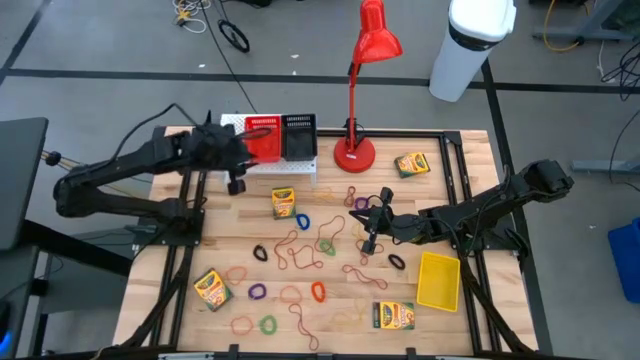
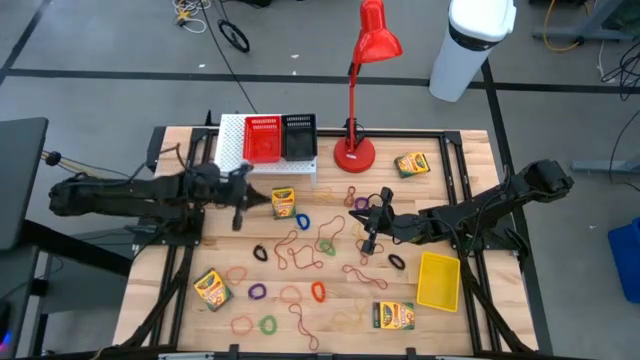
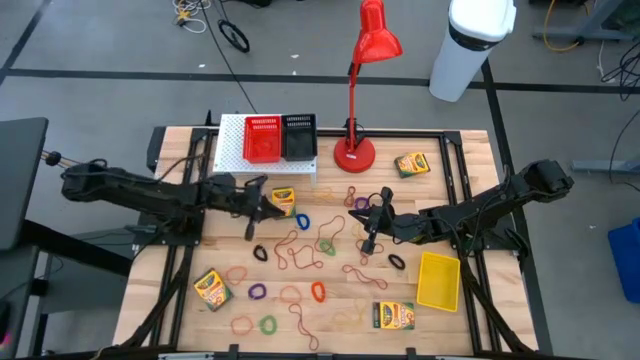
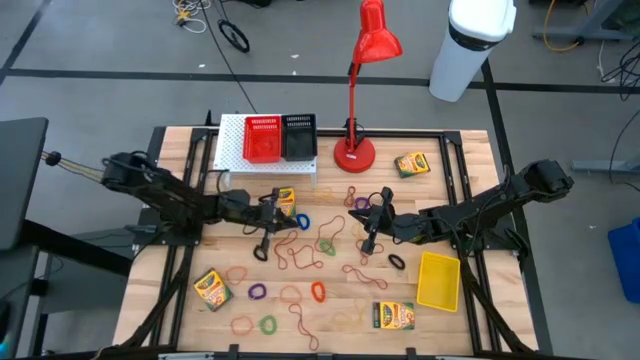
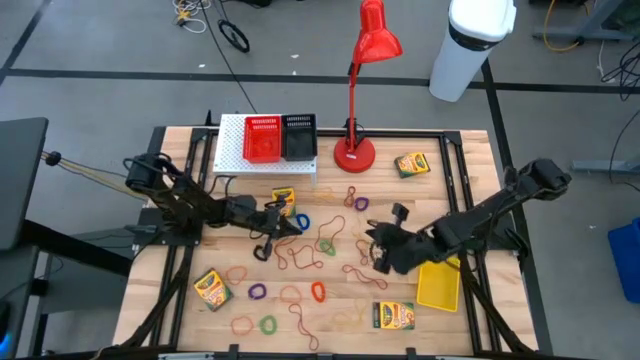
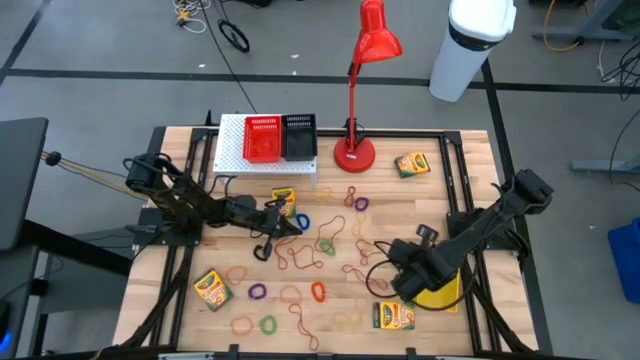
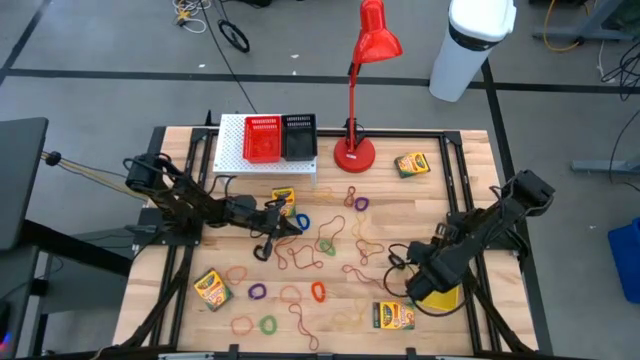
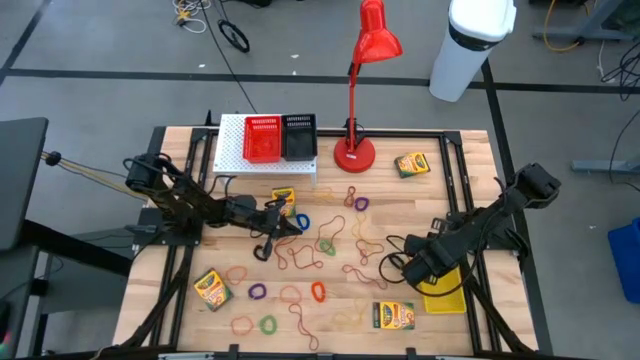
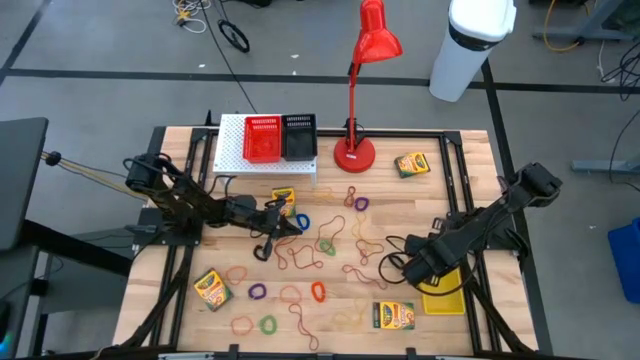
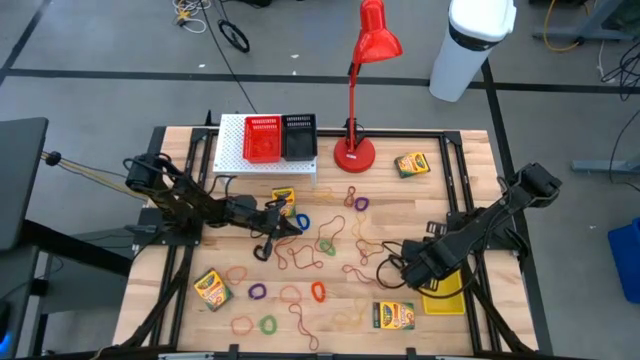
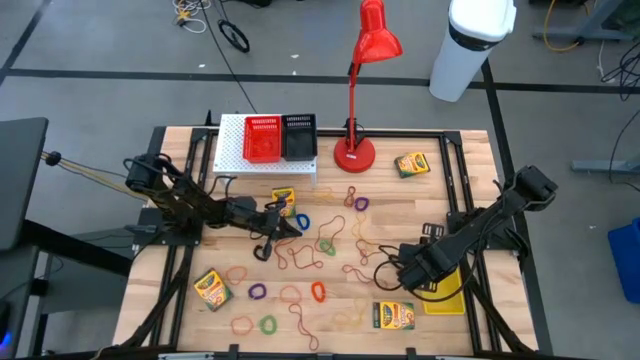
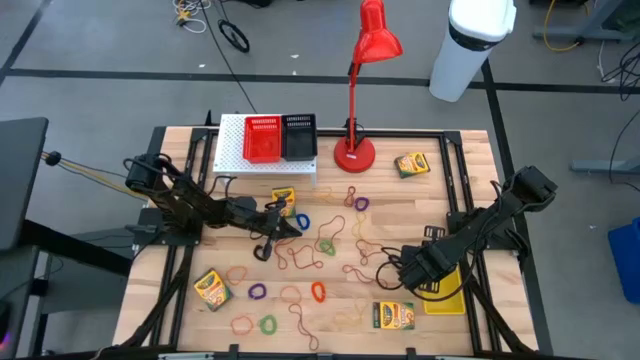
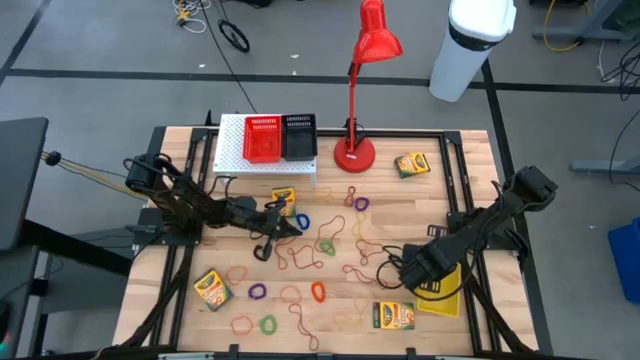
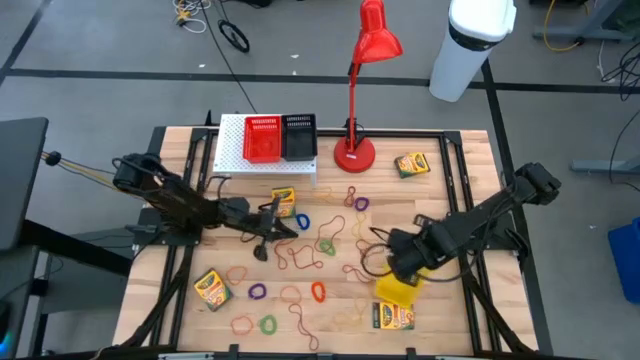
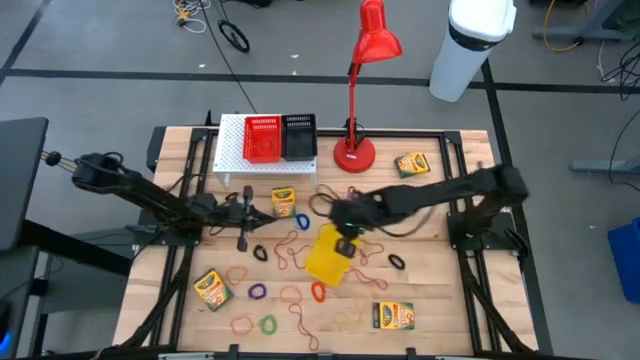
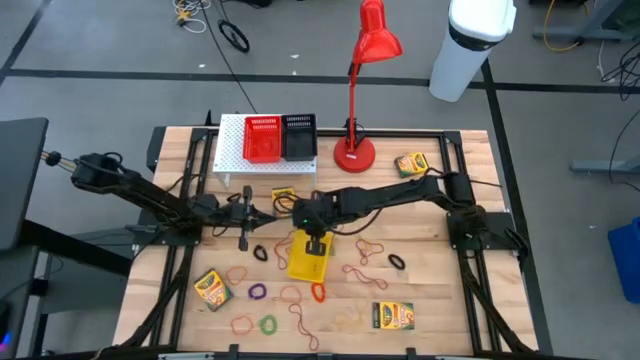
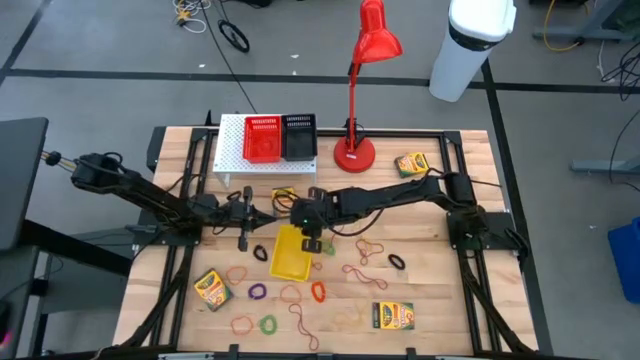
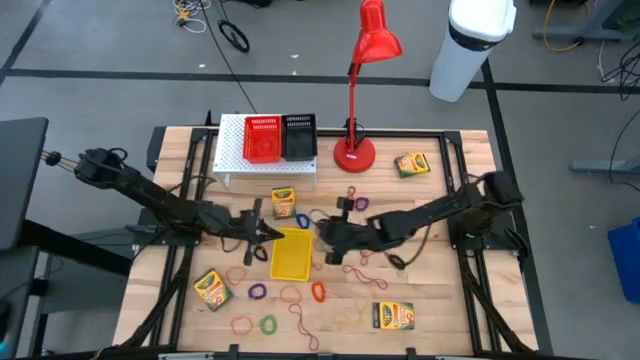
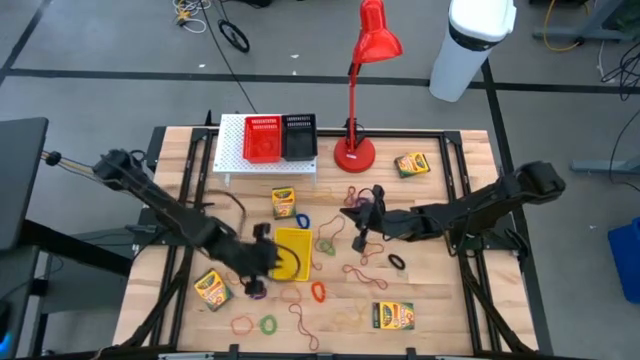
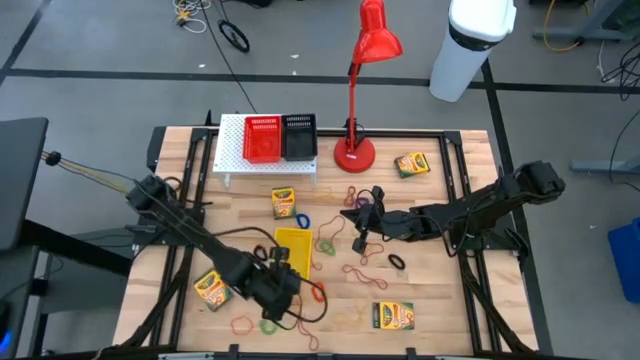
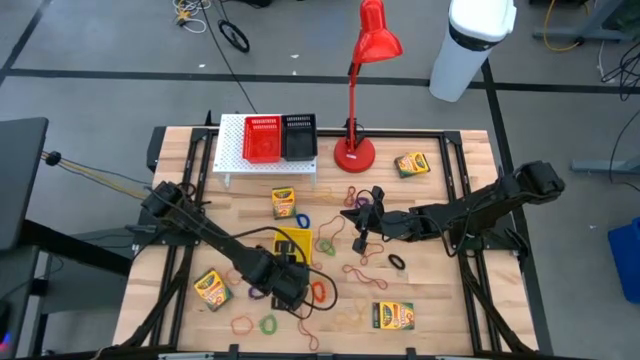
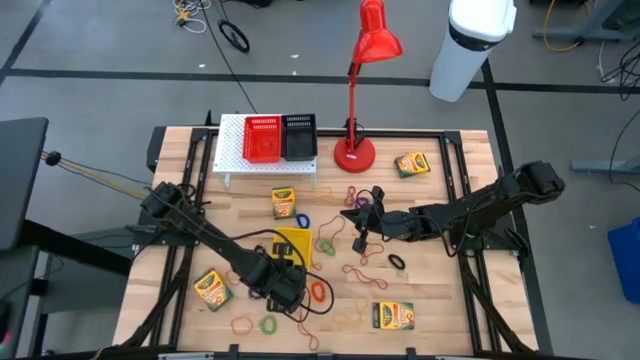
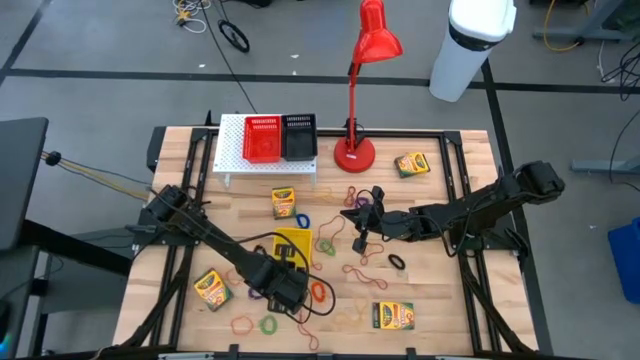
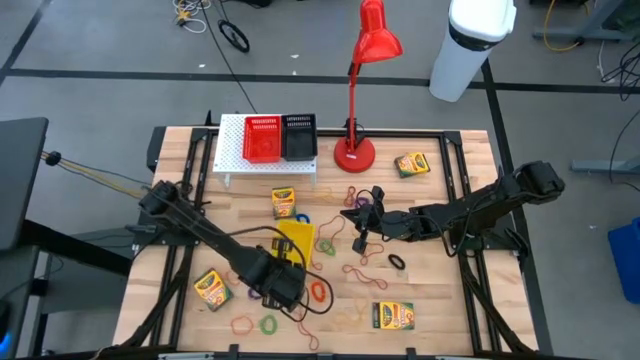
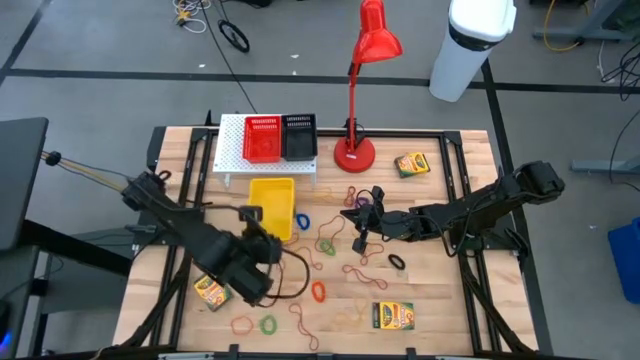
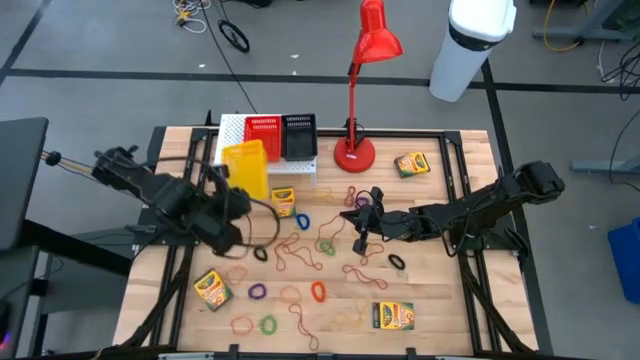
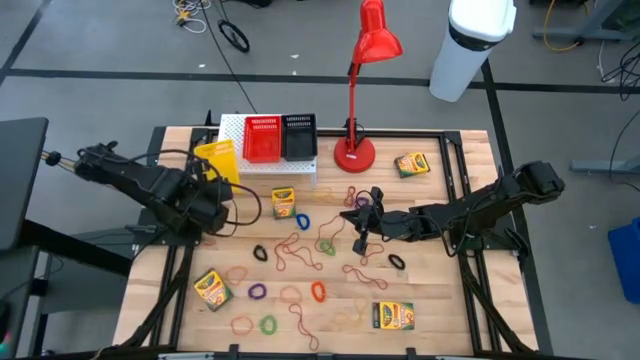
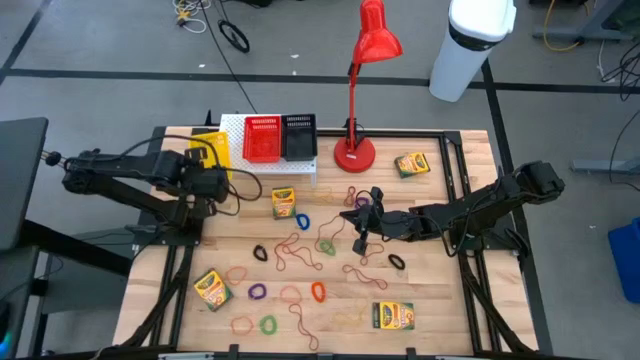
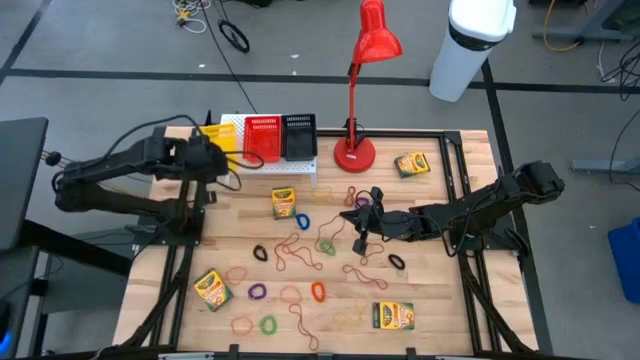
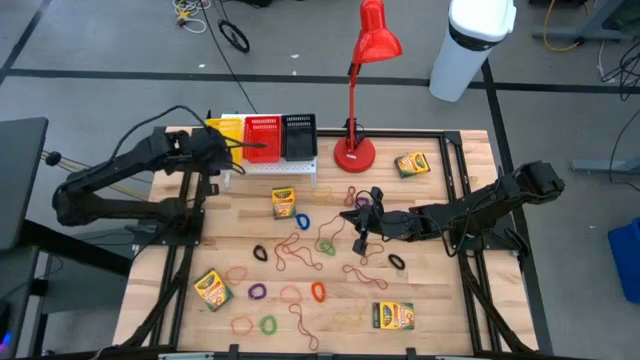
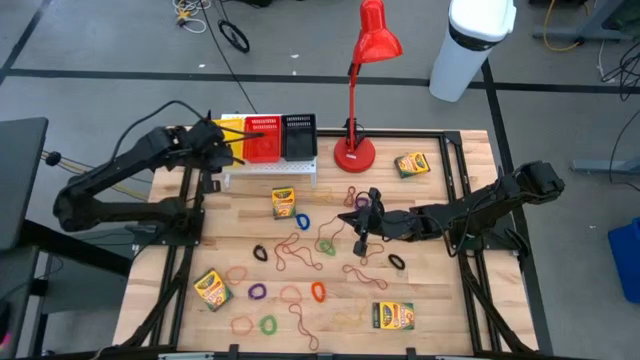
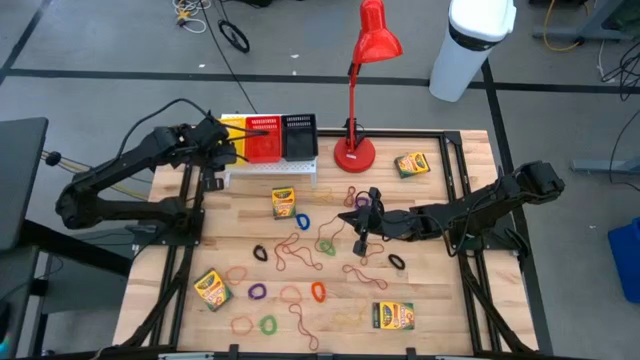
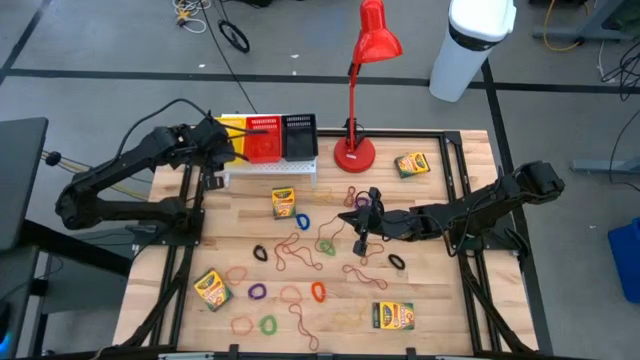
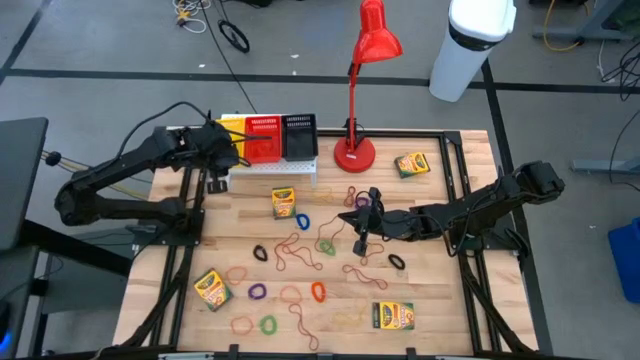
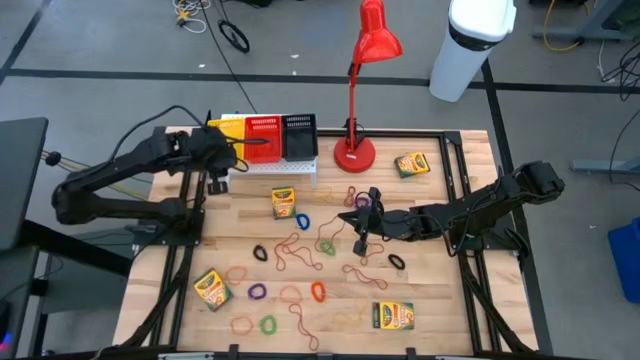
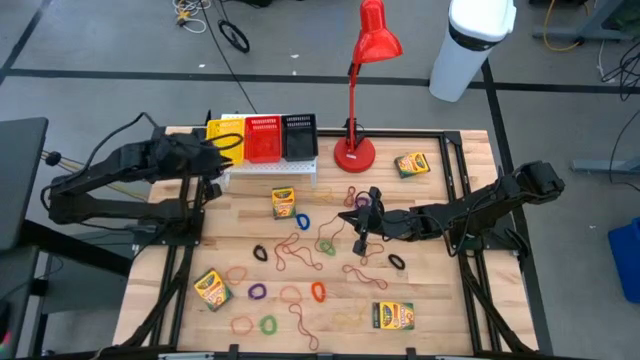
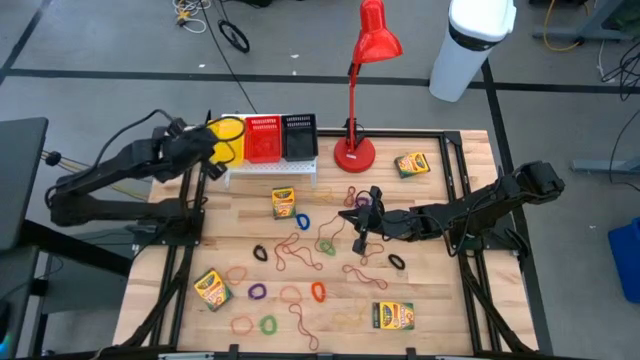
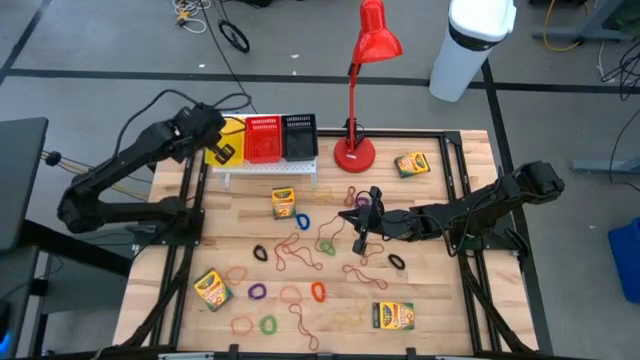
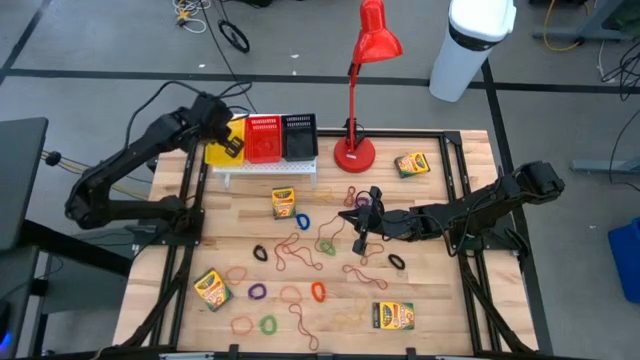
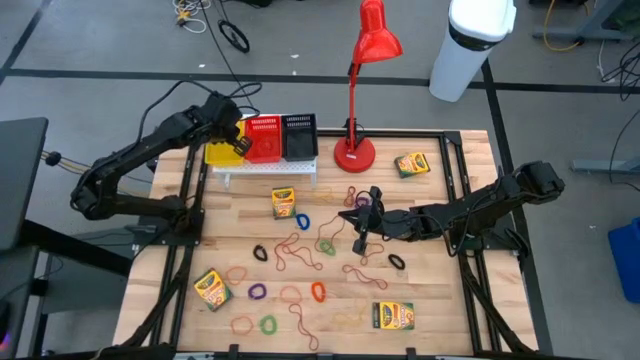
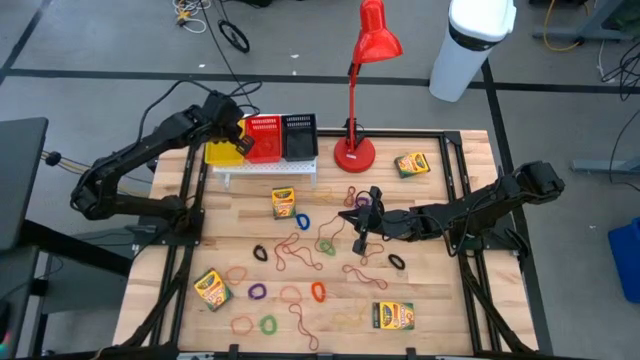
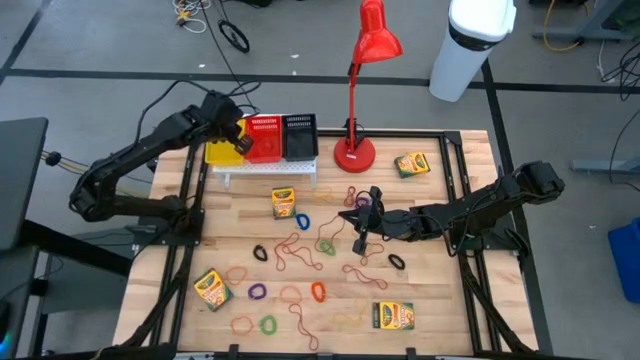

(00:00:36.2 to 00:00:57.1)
Task: Pick & Place Office Desk Supplies
Put the yellow bin on the shelf
